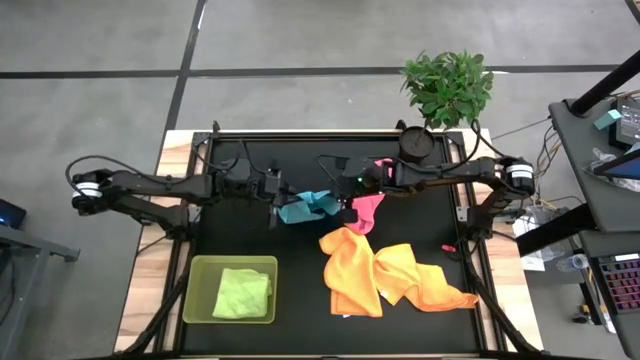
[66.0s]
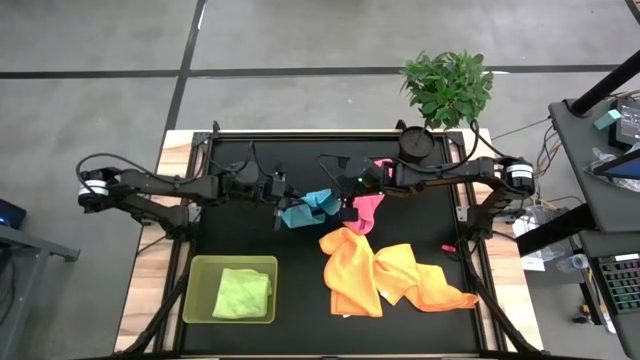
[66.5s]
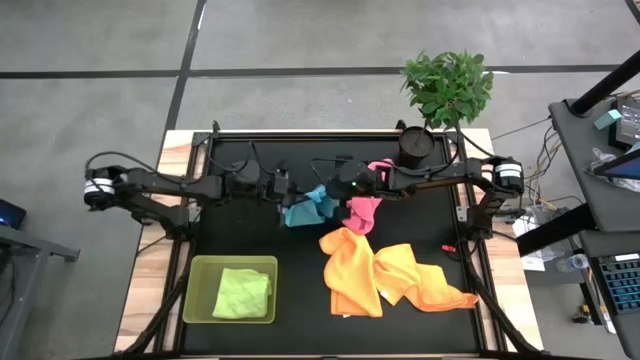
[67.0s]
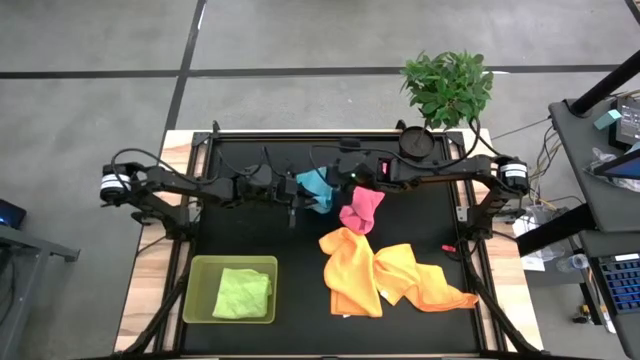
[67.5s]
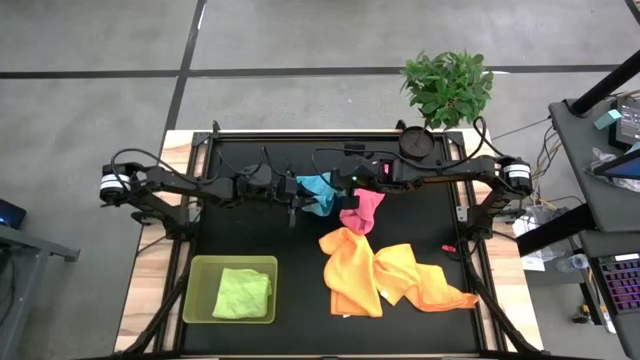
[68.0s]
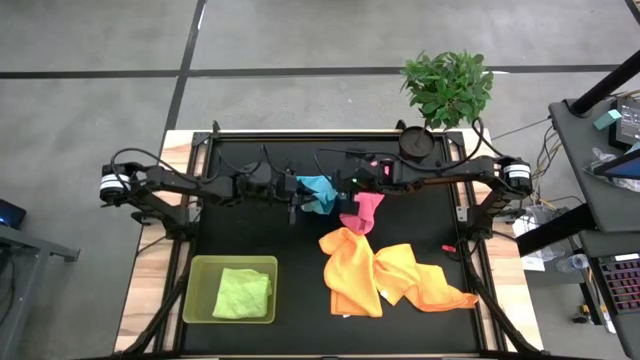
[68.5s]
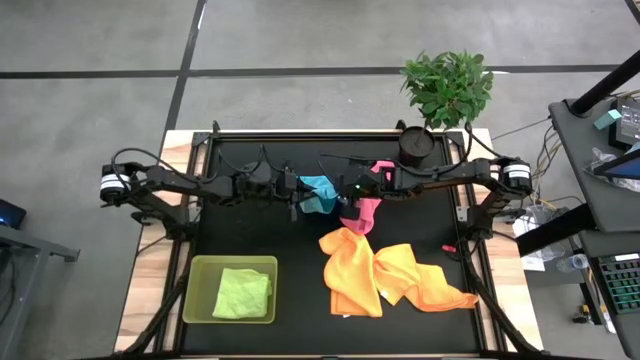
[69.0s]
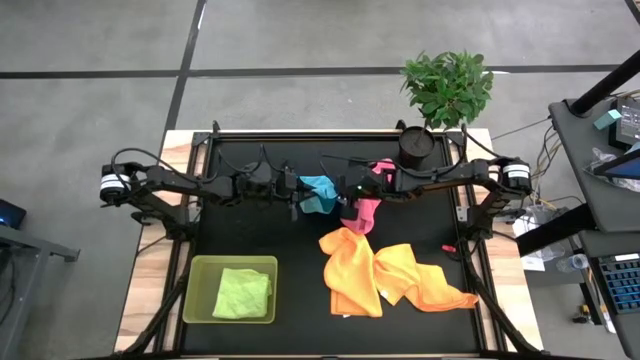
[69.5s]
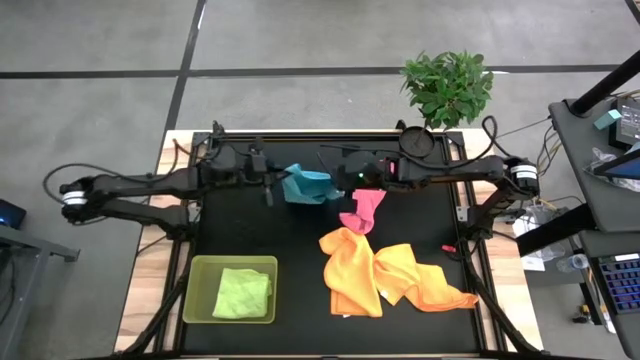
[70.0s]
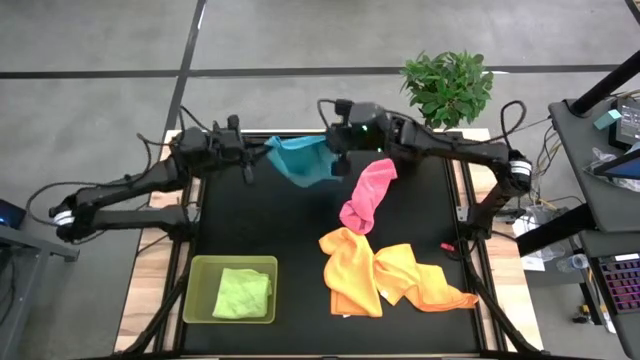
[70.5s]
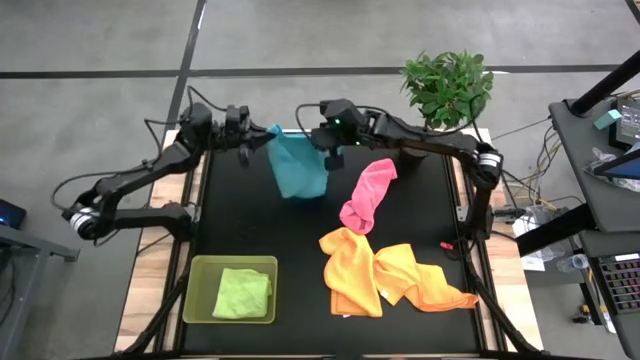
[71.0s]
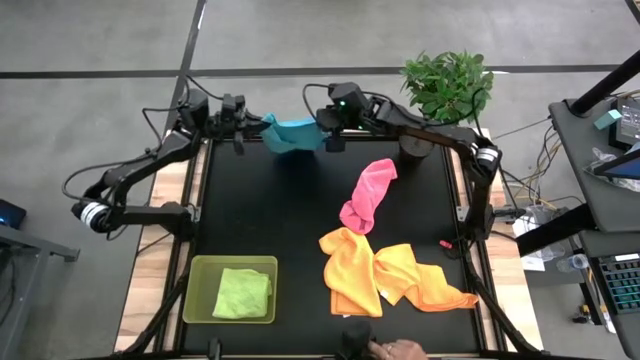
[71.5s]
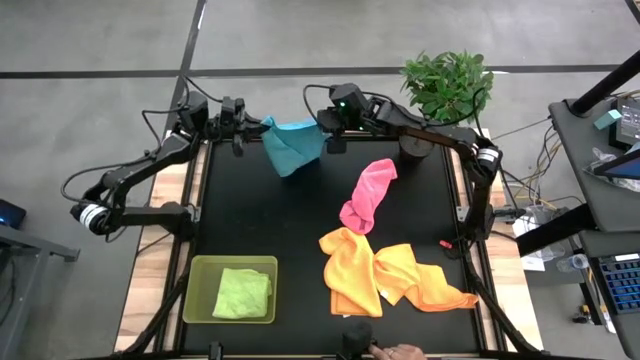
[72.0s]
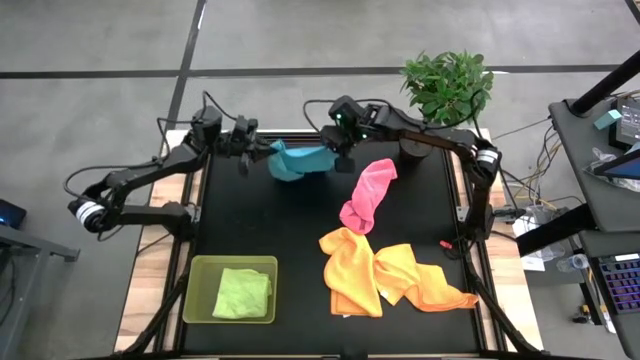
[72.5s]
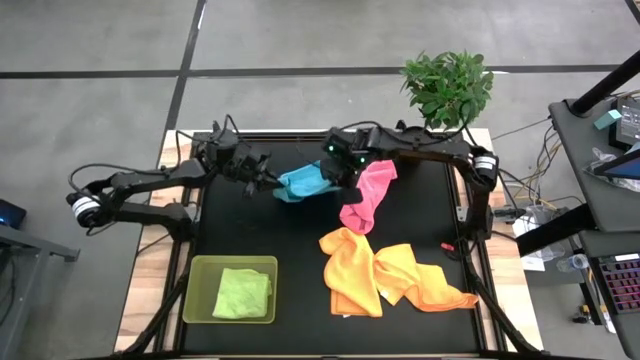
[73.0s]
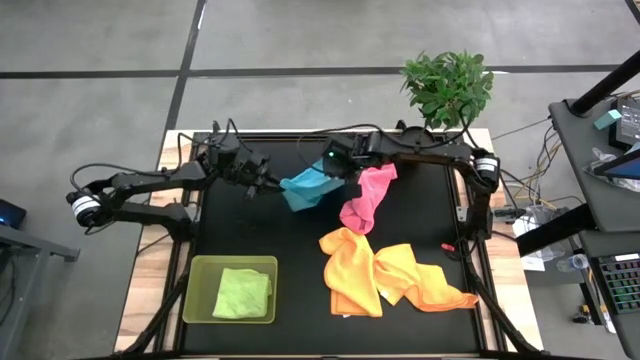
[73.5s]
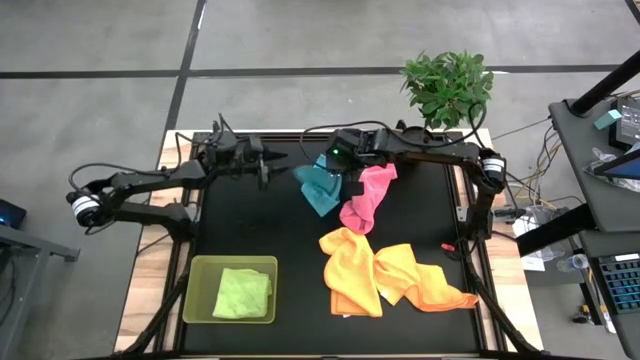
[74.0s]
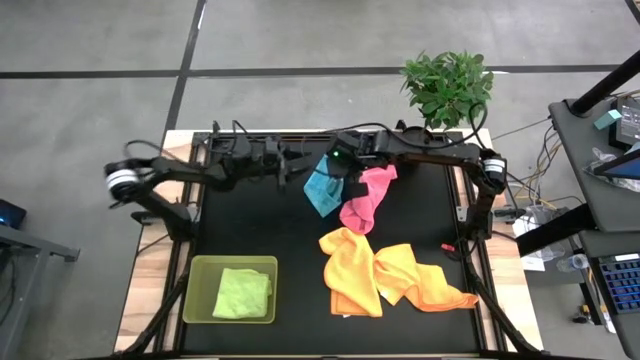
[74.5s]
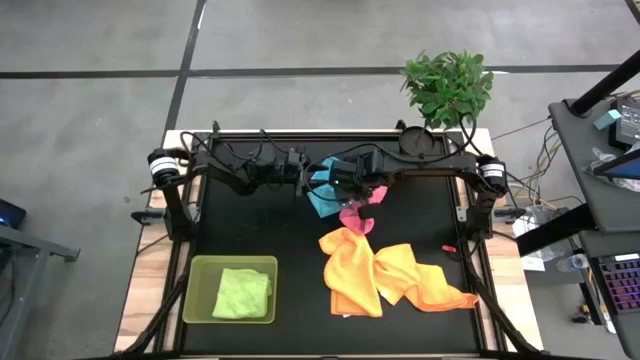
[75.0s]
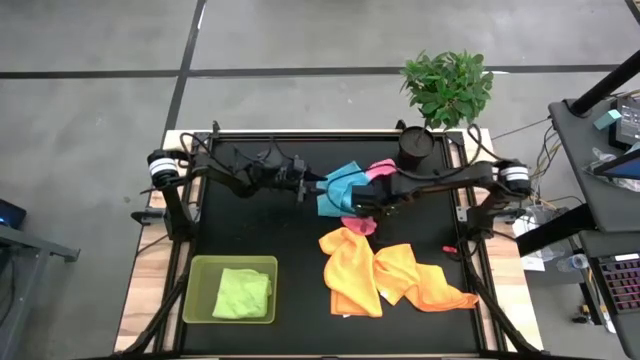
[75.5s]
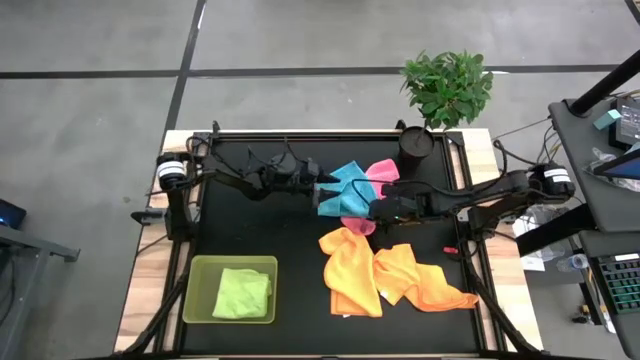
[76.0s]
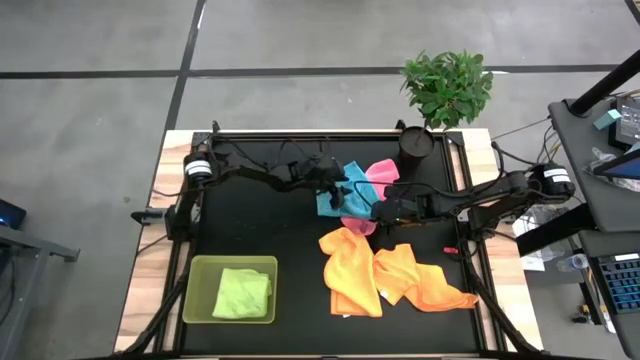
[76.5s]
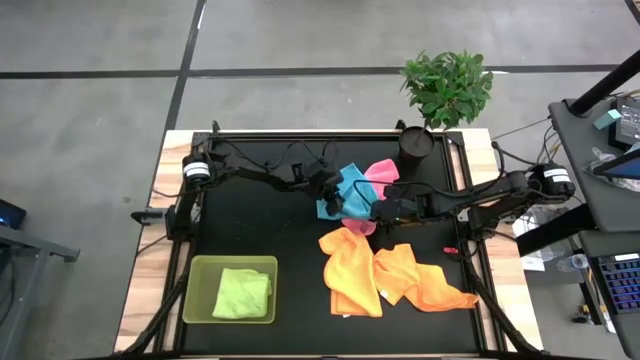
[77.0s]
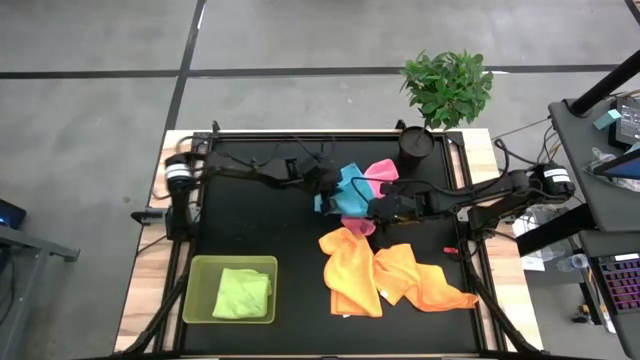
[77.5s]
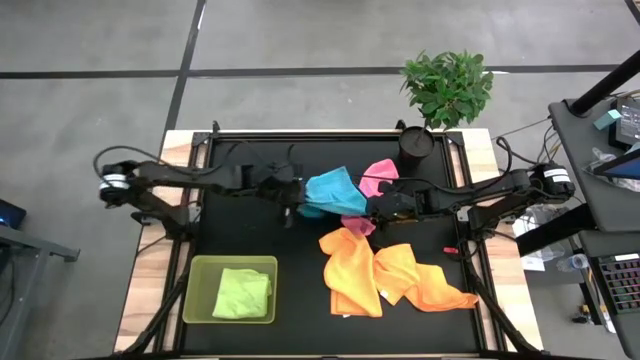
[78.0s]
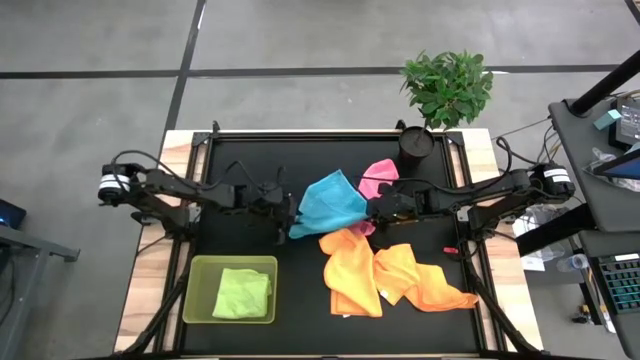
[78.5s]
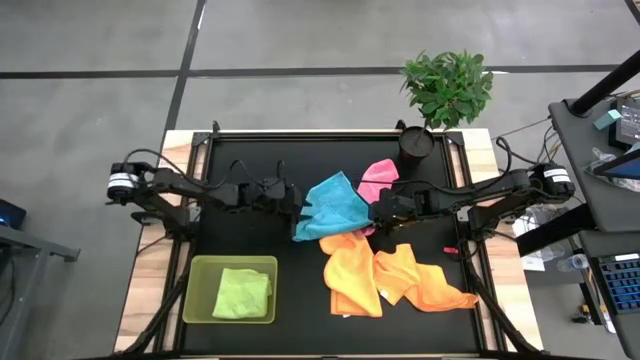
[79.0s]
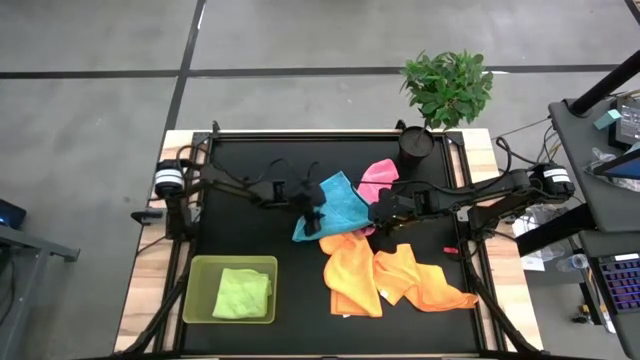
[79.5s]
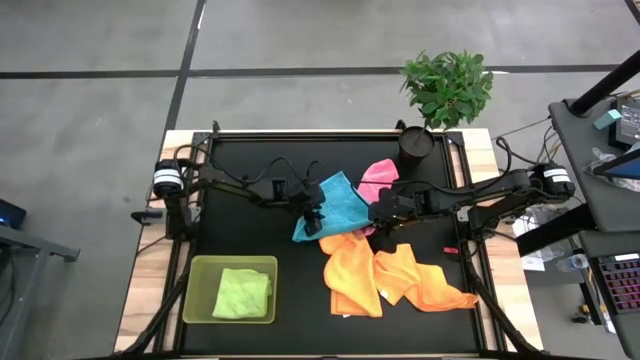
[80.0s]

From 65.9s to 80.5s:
Task: Fold microfiber towels
Fold the blue microfiber towel

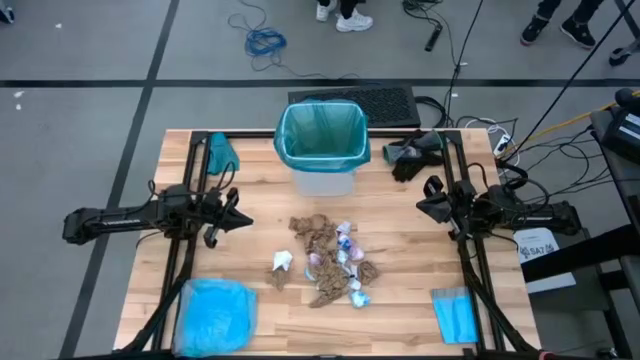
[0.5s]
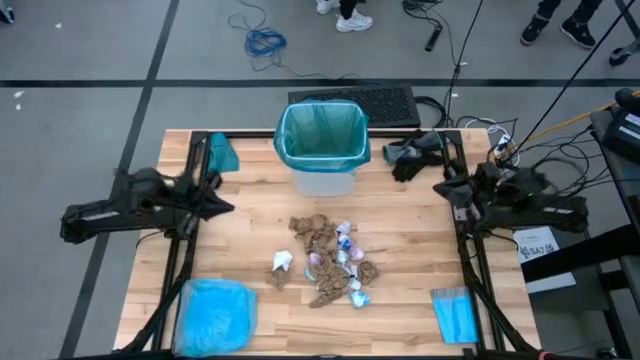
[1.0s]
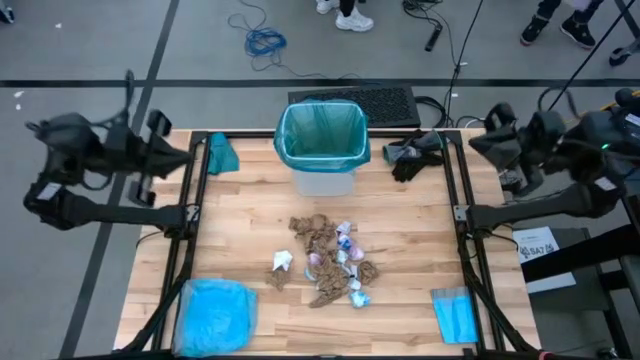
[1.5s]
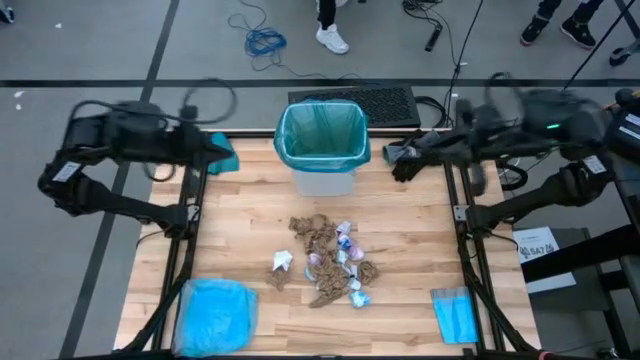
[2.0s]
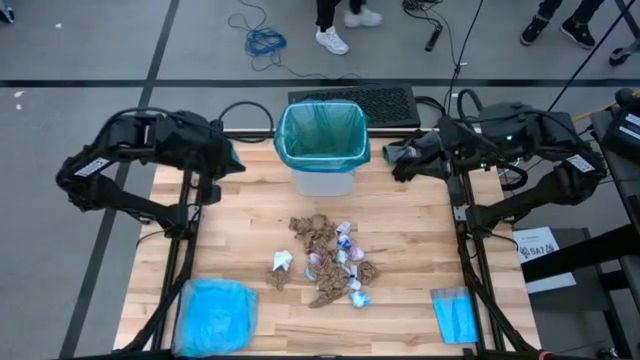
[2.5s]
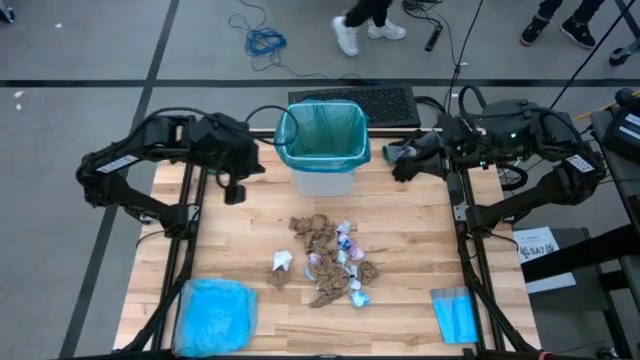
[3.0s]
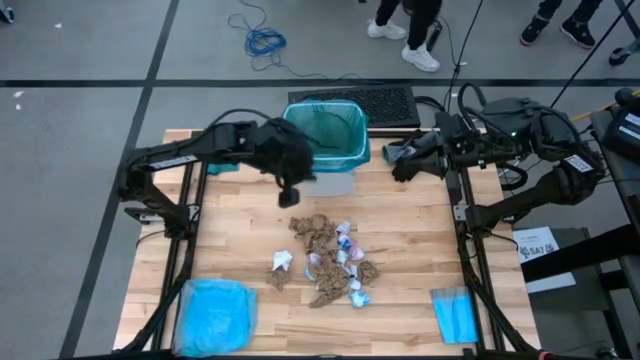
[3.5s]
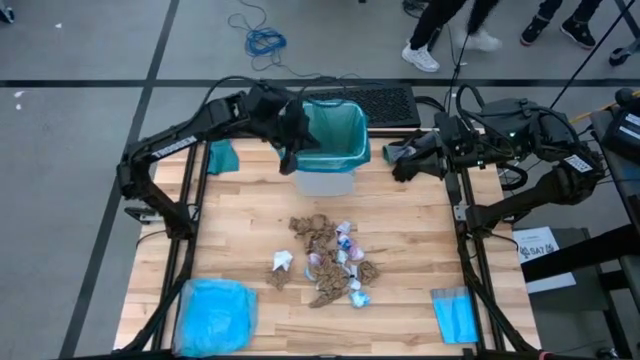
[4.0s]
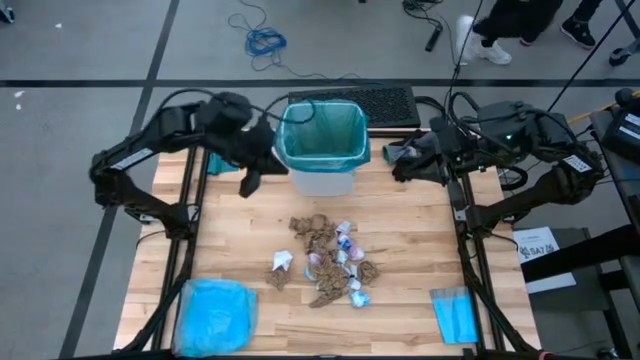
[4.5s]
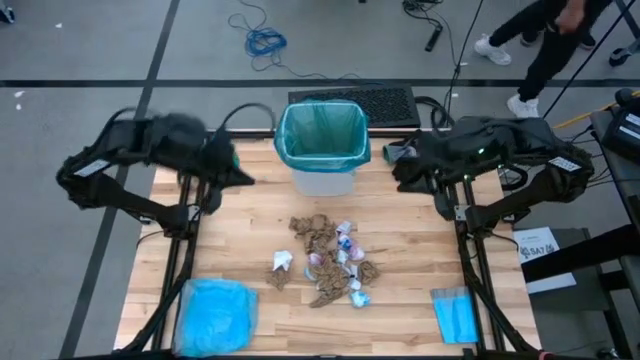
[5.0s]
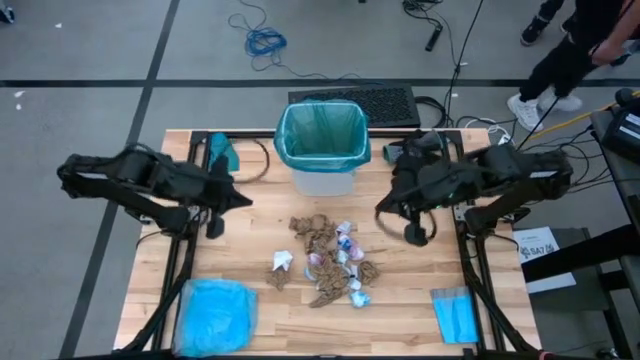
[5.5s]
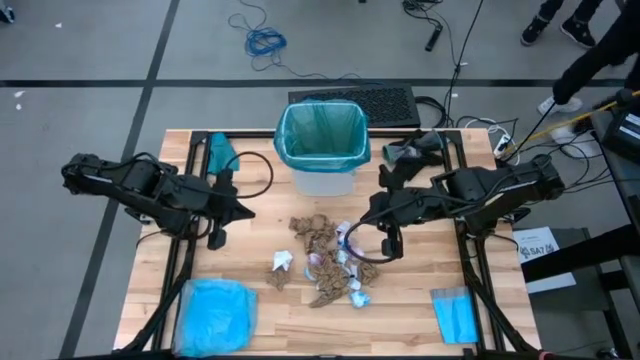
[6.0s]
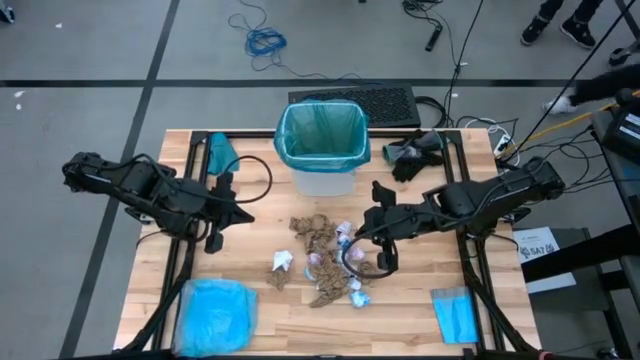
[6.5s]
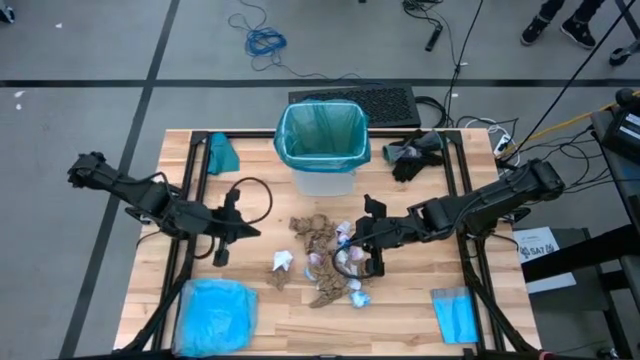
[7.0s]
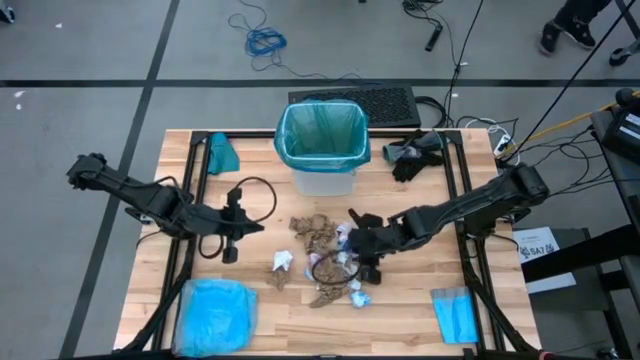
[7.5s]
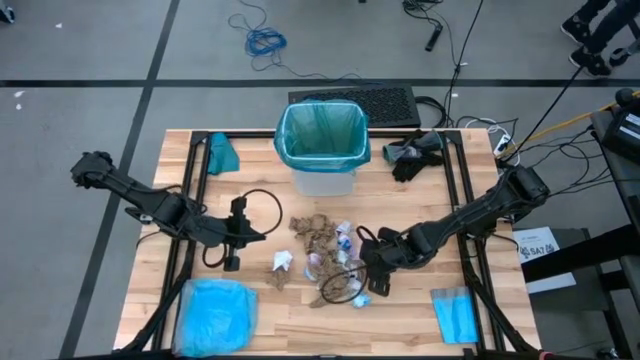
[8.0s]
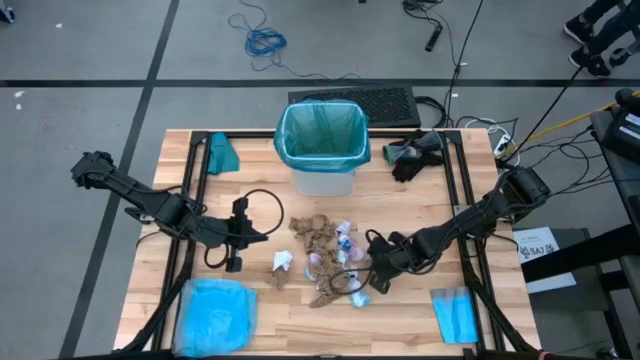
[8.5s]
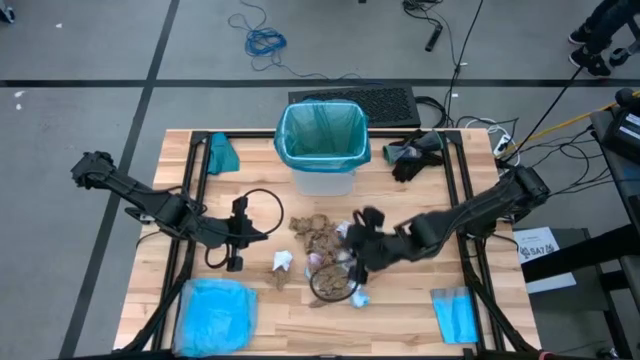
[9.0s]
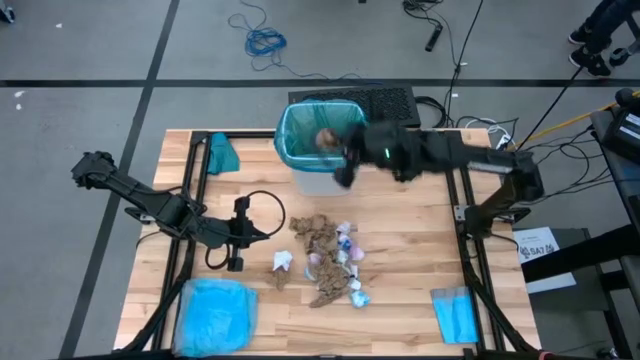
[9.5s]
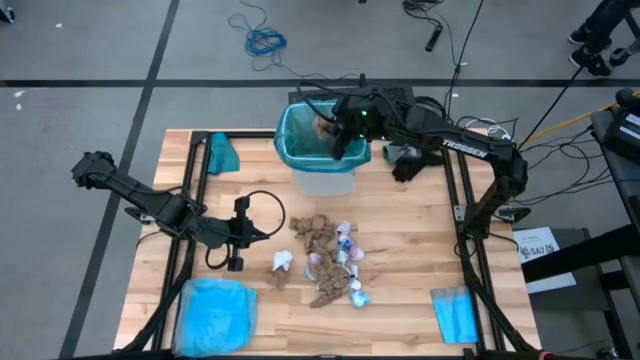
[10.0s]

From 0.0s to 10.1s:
Task: place trash/remove bag and relplace
Put the brown napkin into the trash bin
